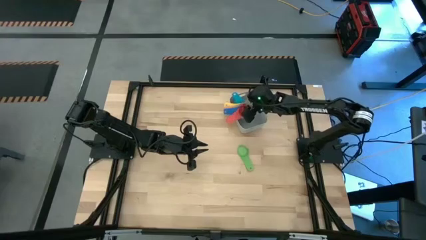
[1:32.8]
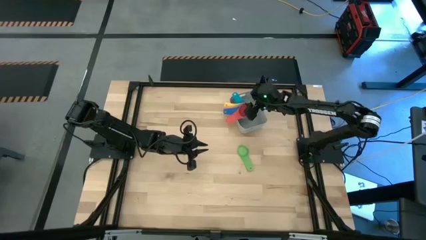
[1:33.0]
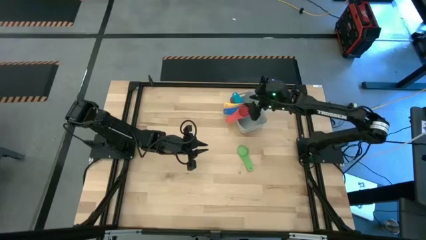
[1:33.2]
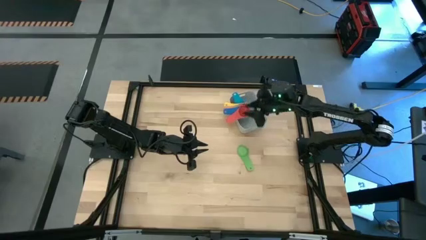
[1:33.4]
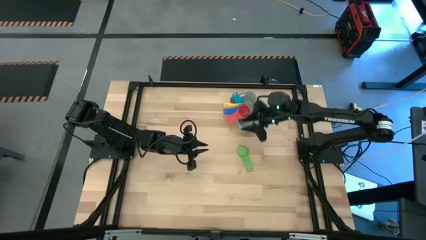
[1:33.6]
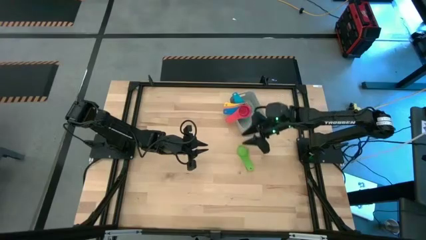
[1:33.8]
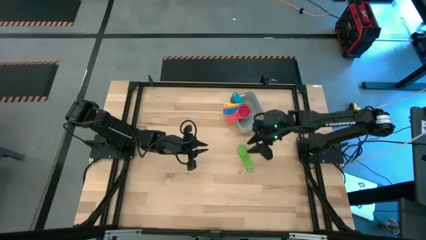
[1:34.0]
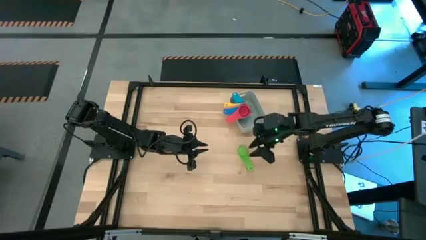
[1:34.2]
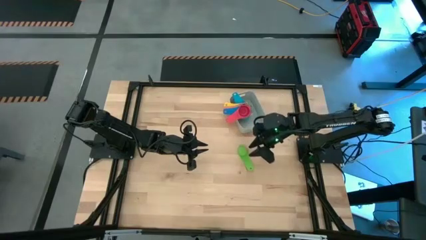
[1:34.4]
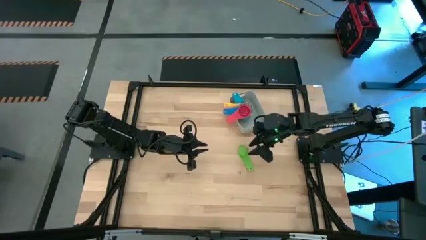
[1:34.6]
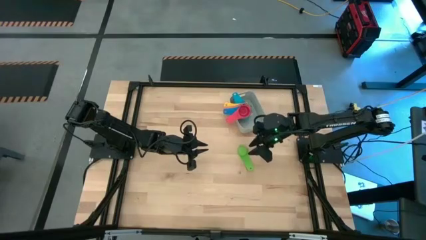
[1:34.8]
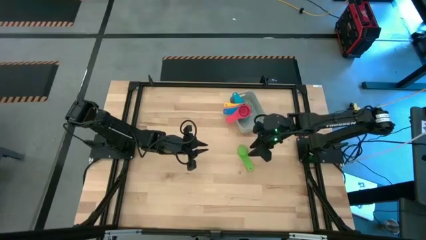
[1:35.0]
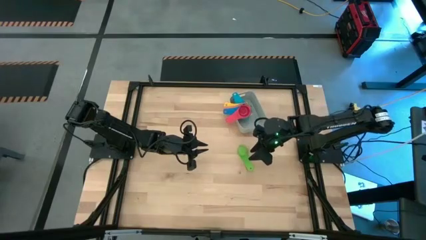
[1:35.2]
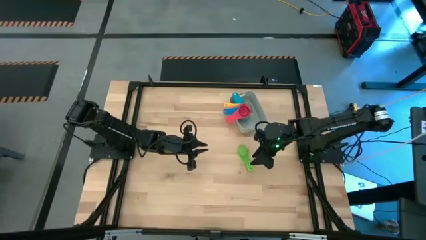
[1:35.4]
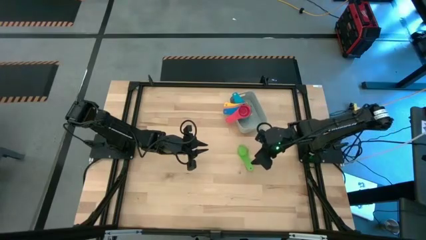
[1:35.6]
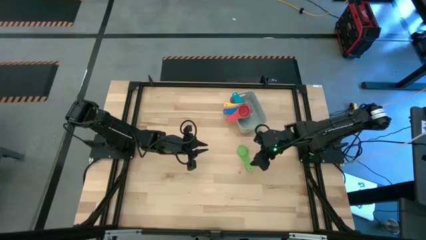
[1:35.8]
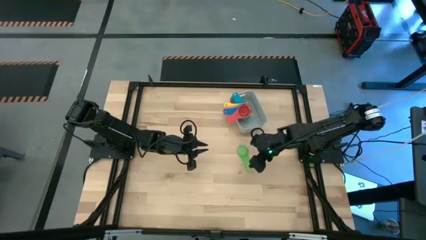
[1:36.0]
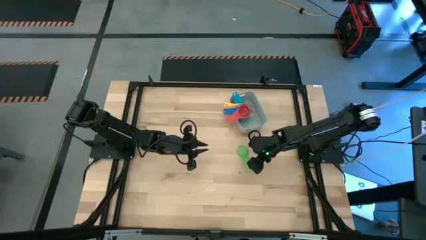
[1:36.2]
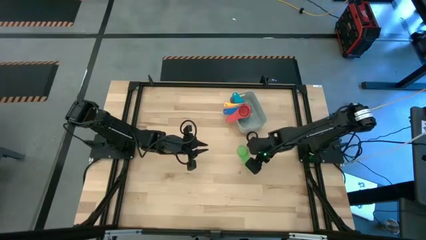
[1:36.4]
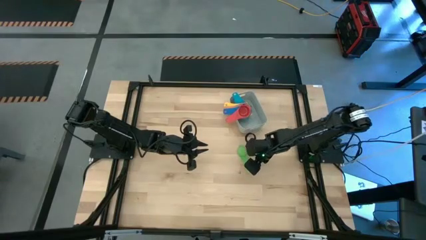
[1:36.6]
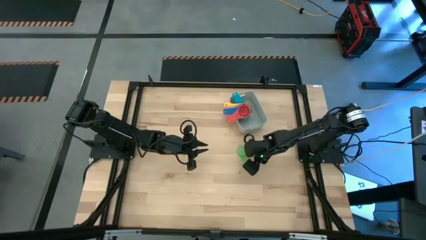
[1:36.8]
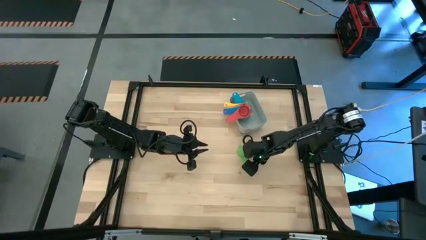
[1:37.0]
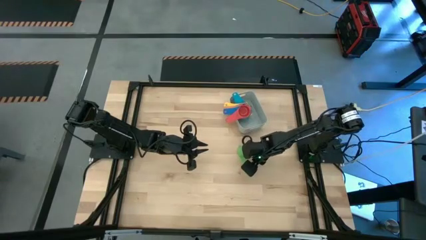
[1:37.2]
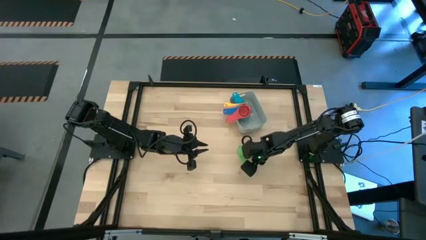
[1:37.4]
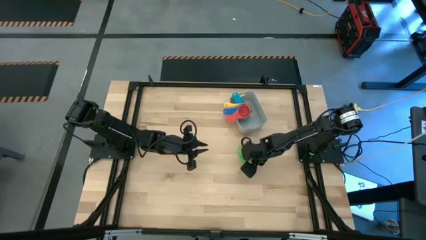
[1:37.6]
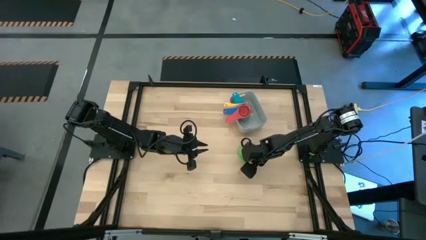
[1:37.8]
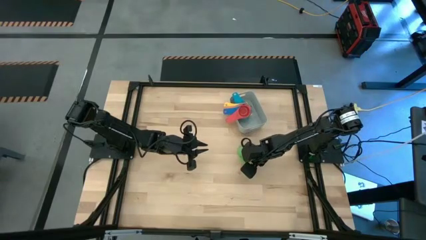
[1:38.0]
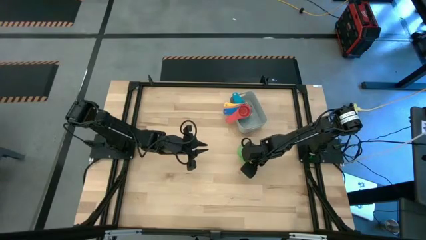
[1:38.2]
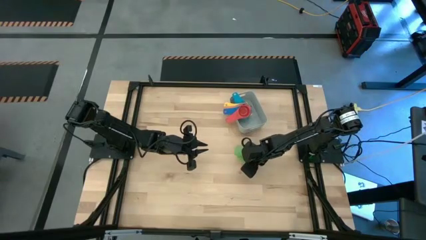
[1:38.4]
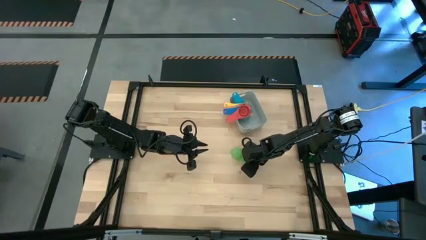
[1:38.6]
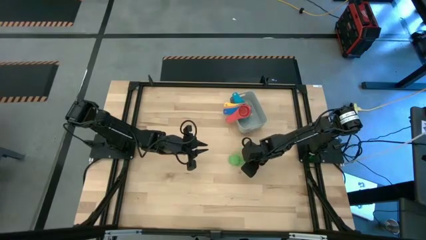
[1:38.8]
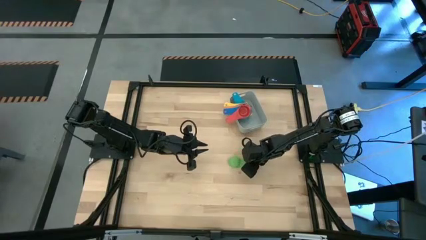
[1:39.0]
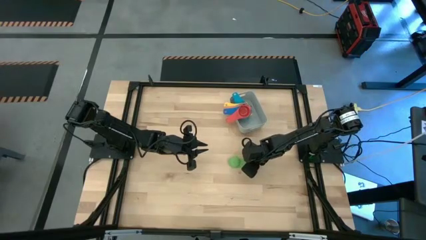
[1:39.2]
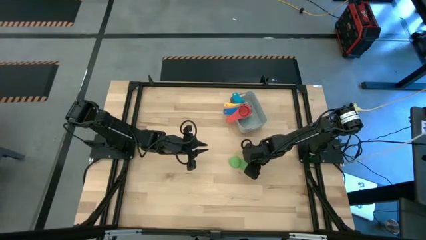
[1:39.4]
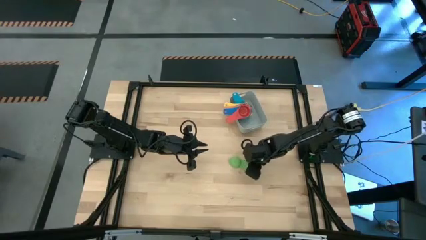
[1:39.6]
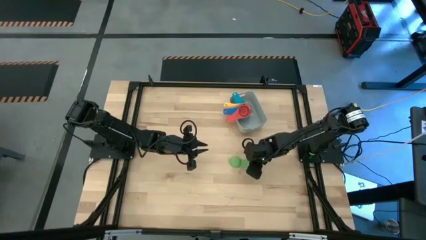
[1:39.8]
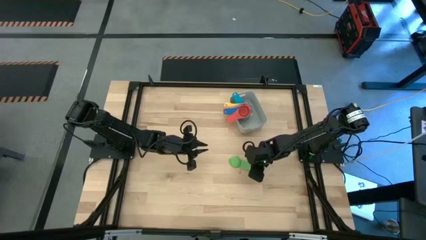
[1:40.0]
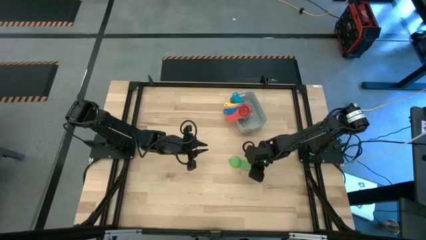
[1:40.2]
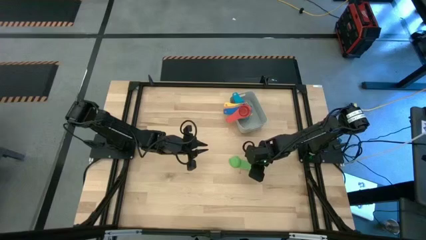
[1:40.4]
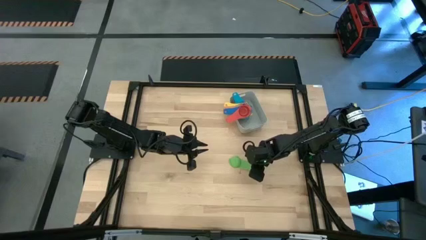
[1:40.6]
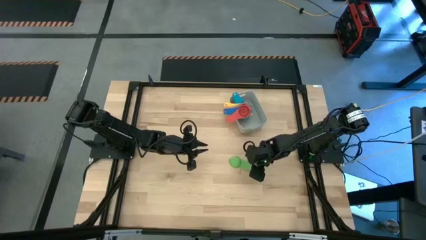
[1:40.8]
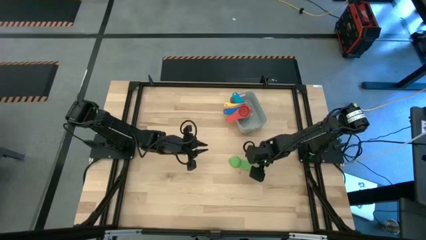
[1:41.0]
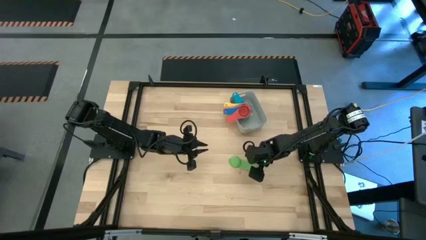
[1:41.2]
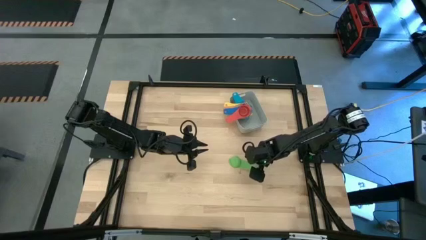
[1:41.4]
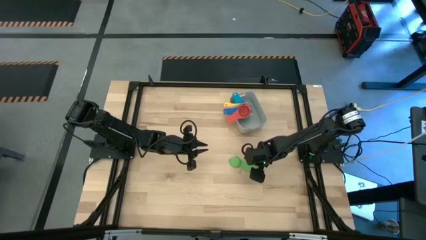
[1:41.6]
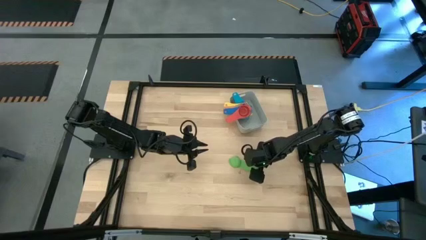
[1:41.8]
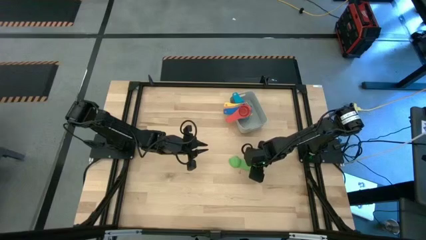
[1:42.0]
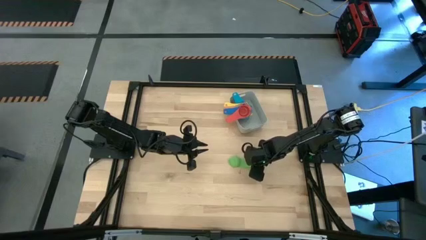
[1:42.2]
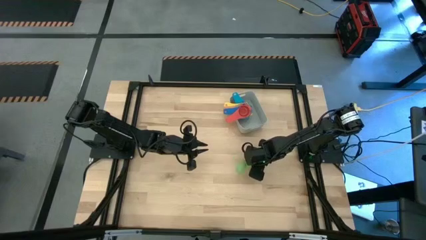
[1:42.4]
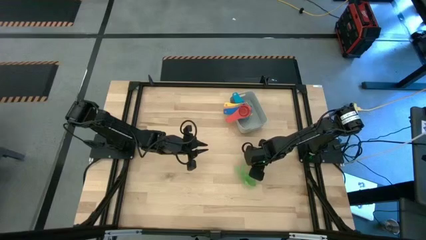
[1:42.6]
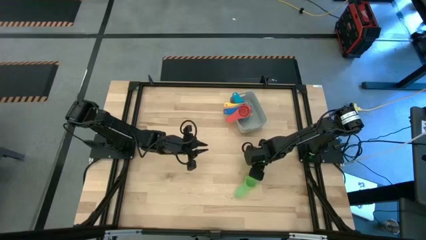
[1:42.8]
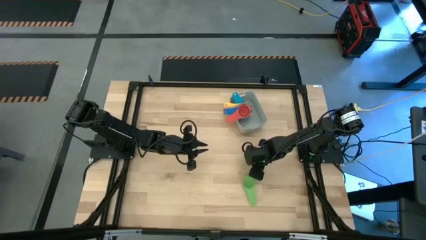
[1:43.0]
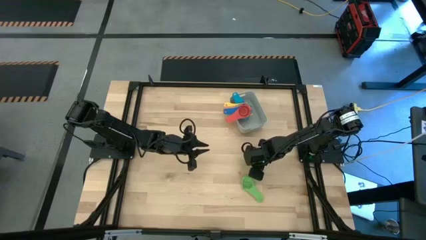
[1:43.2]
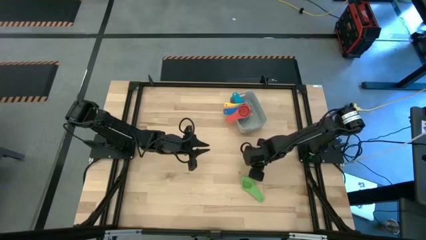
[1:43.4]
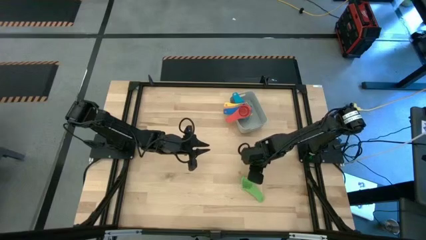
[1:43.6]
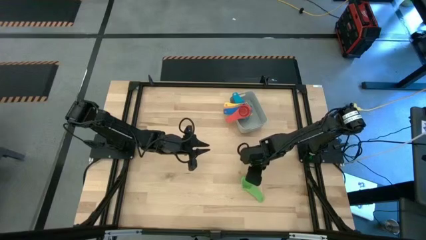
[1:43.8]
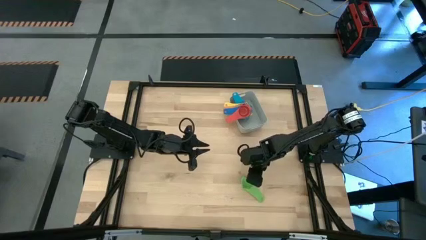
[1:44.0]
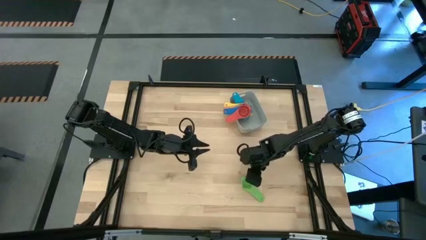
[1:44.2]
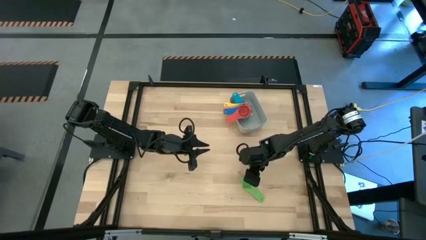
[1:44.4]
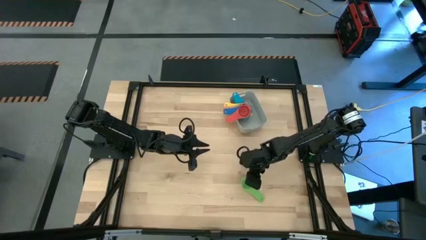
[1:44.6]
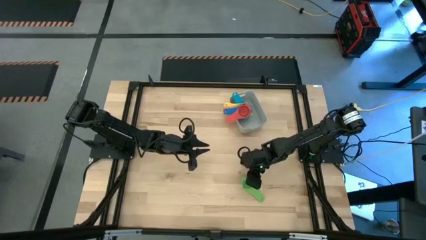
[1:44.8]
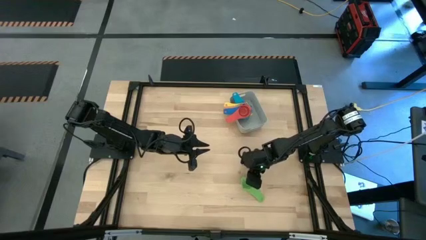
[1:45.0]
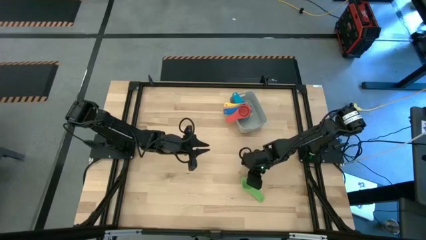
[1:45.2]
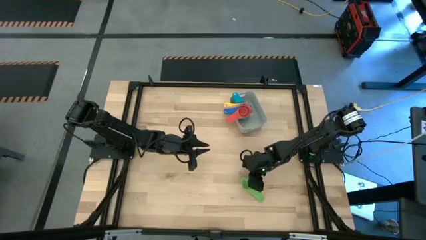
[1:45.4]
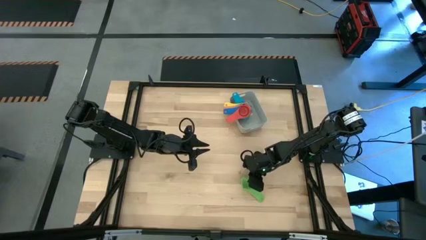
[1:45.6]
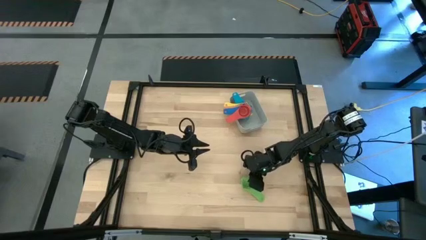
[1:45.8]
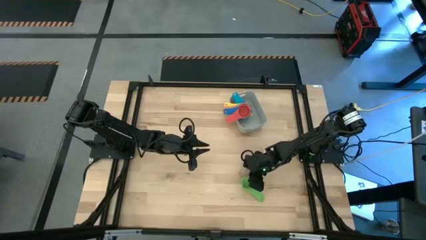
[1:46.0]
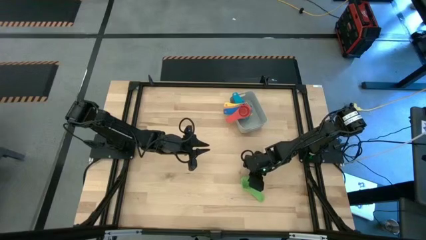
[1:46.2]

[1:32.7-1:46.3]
Task: Nest measuring cups in basket
Stack the green measuring cup on top of the red measuring cup into the gray bin
